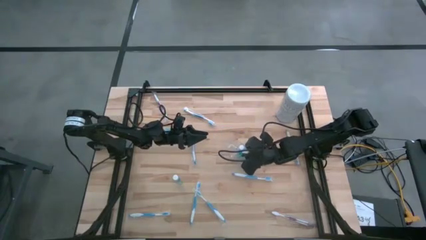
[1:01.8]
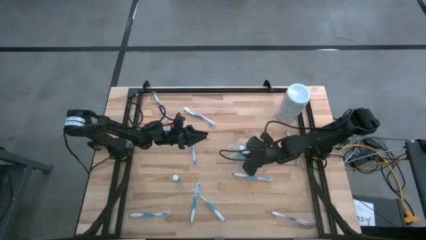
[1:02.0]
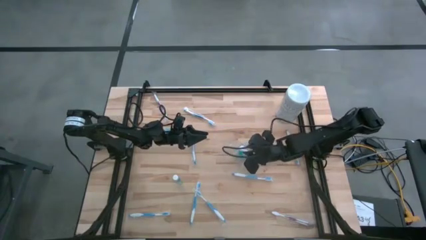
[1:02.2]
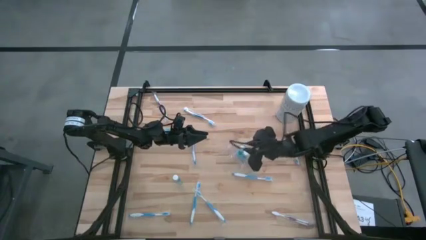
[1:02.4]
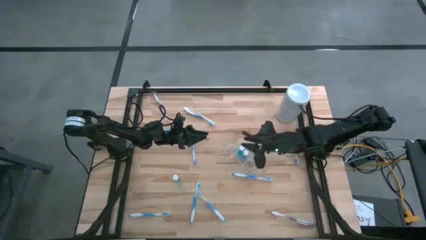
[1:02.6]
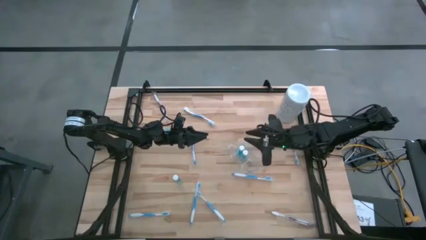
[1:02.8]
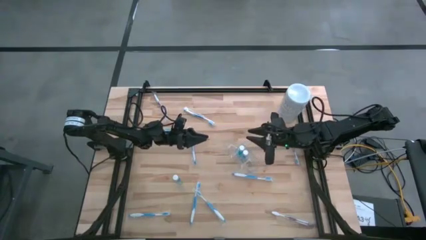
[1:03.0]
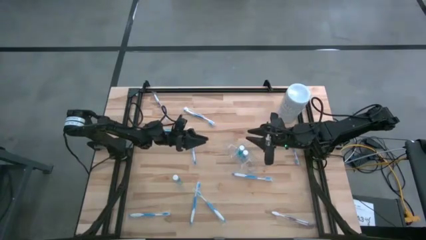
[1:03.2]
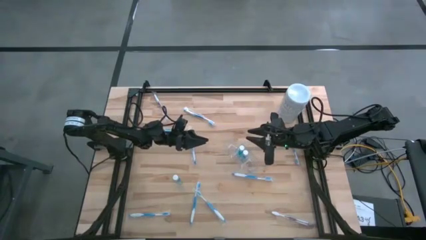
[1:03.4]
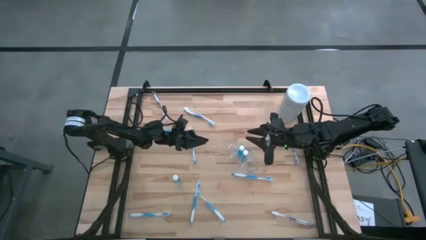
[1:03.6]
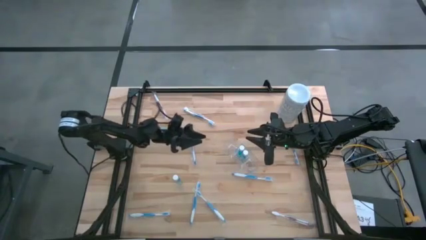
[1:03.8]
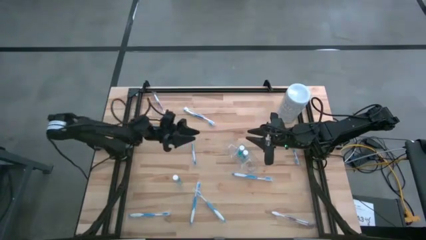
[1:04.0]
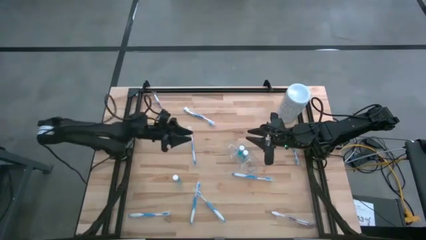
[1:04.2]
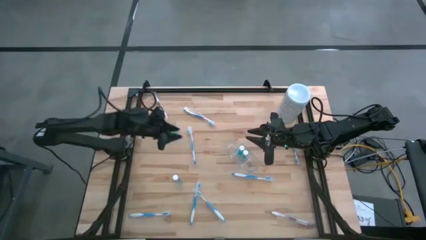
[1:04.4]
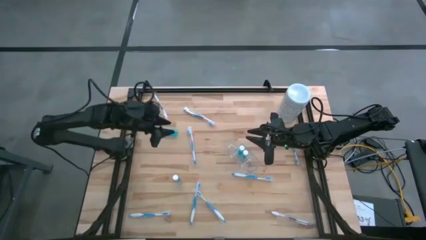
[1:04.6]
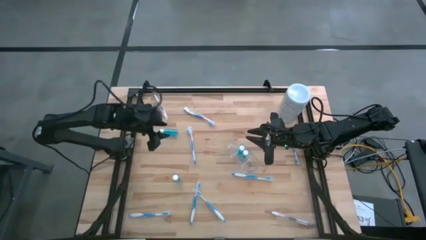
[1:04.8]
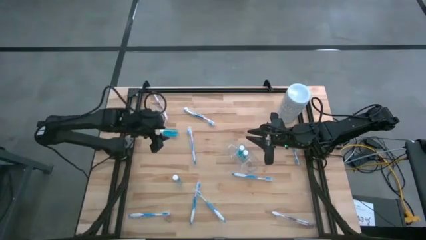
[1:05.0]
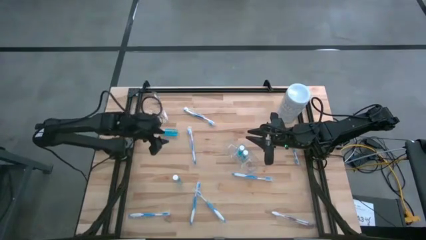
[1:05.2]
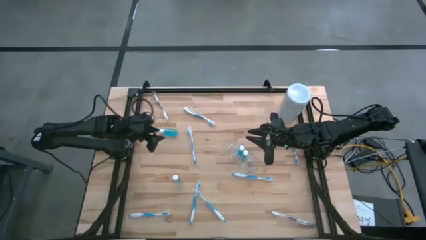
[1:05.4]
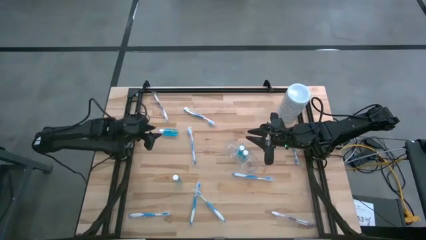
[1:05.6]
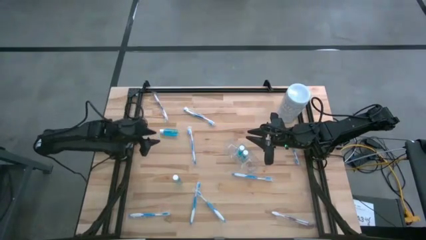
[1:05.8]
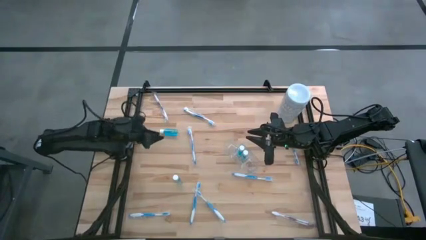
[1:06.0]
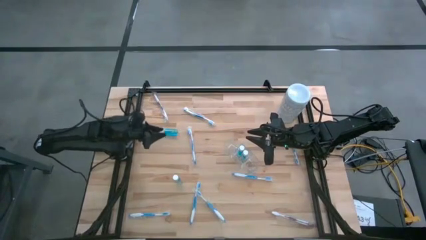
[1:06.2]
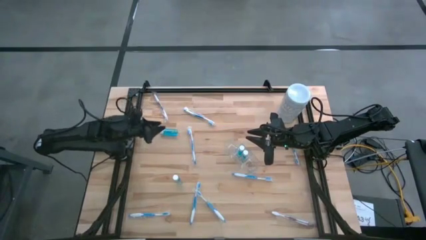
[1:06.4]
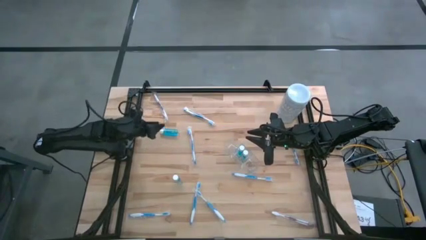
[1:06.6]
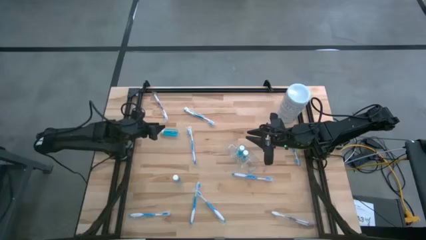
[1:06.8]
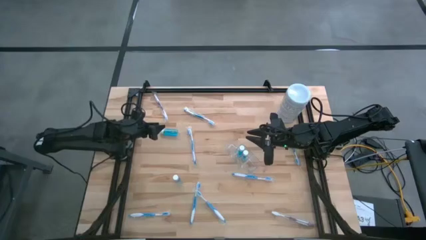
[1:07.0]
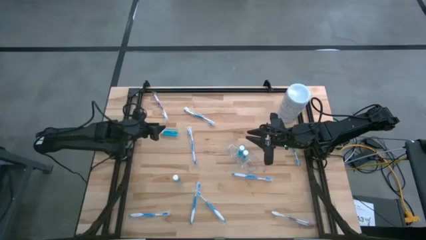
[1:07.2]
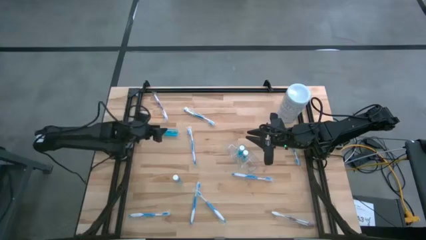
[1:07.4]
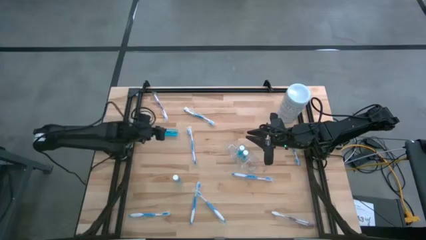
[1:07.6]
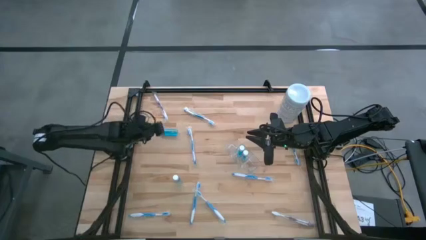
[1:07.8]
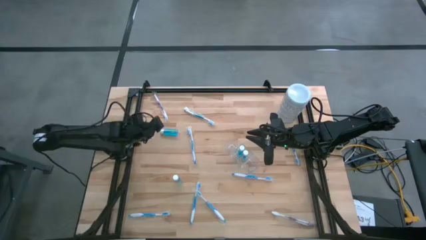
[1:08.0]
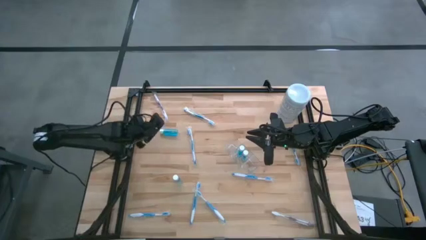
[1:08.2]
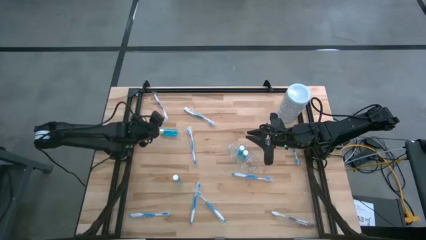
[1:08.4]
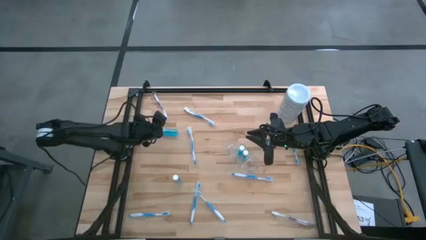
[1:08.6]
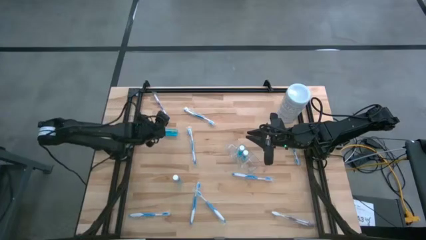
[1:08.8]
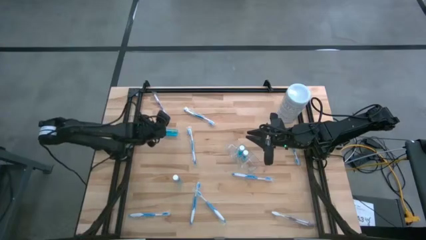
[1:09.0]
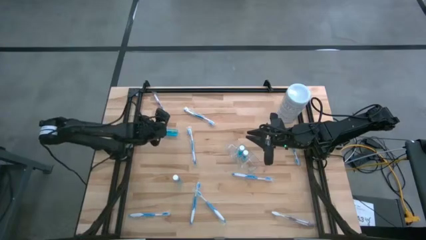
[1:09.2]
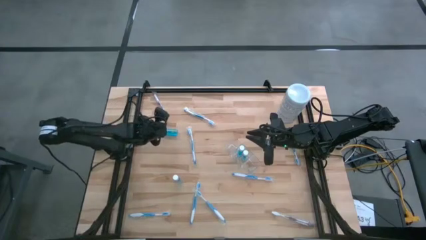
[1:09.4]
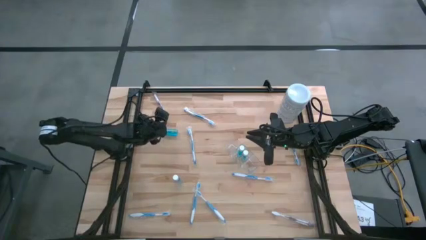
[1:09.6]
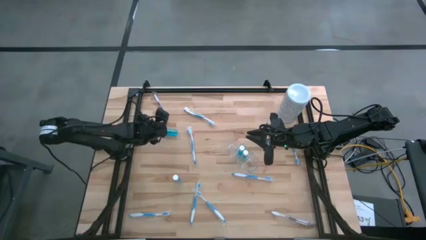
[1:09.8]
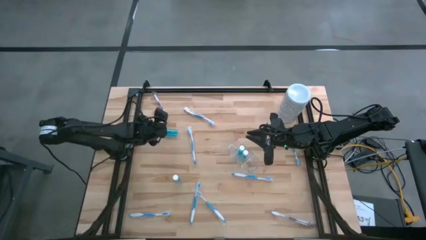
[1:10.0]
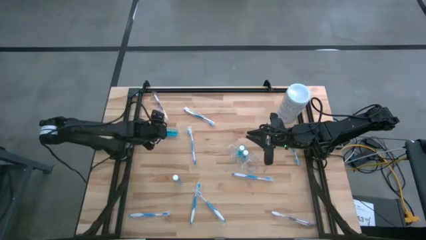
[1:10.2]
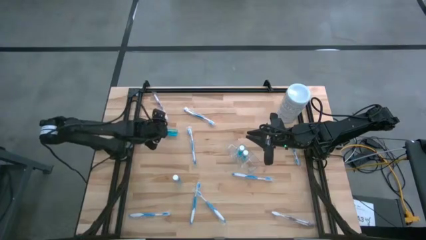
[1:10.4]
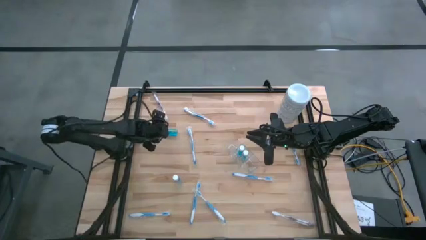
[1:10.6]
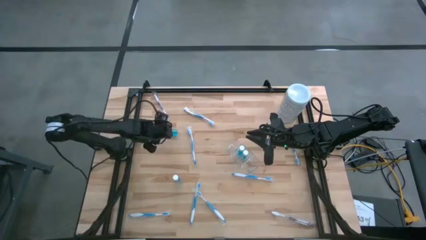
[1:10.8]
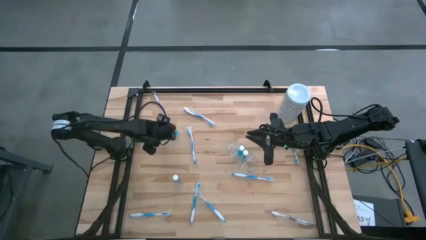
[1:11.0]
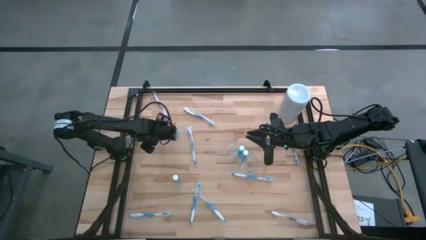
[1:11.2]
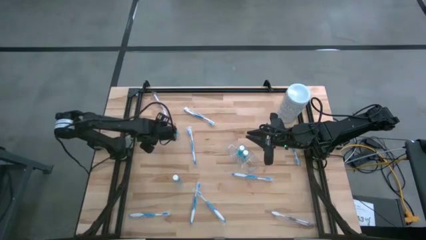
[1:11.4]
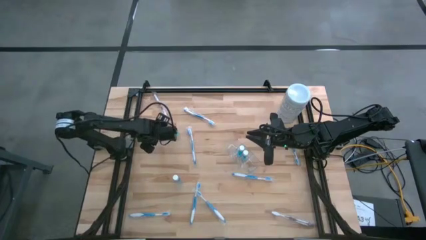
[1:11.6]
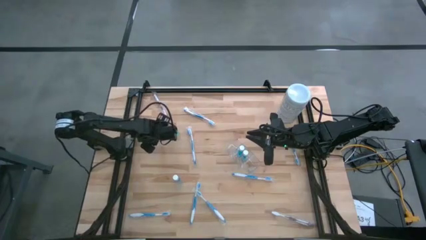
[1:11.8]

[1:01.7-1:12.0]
Task: Pick & Place toothbrushing station
Put the blue mouthwash into the middle section of the transparent organizer
